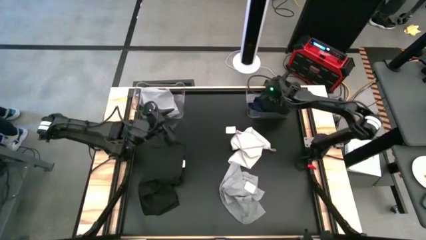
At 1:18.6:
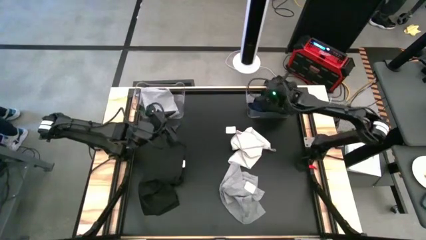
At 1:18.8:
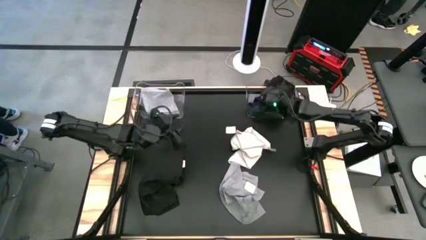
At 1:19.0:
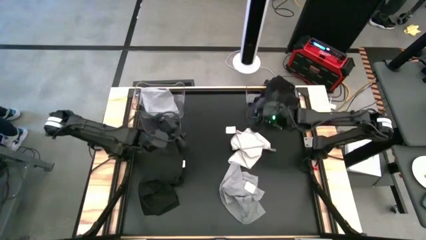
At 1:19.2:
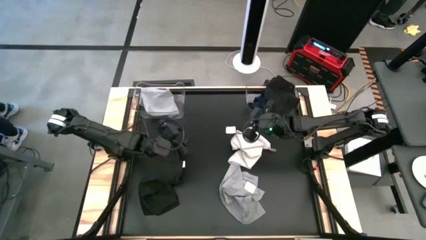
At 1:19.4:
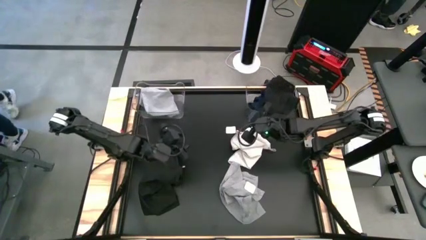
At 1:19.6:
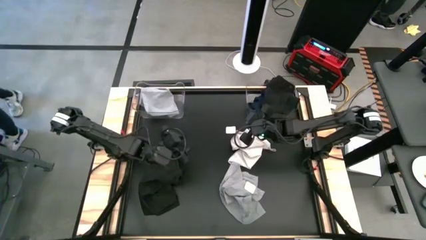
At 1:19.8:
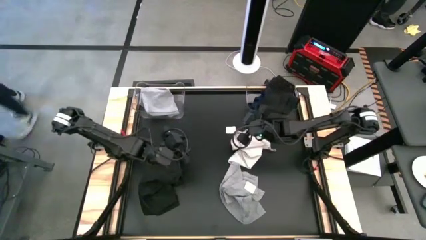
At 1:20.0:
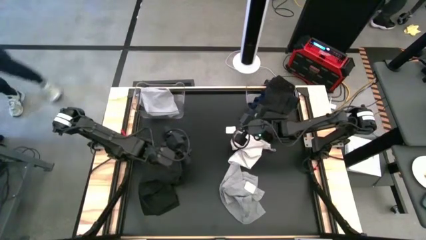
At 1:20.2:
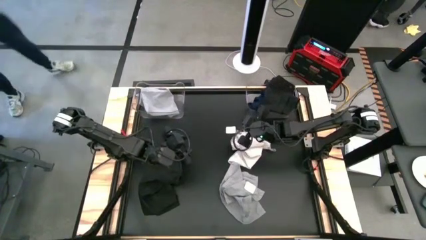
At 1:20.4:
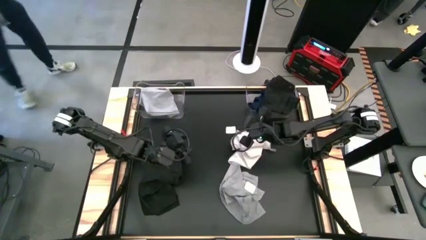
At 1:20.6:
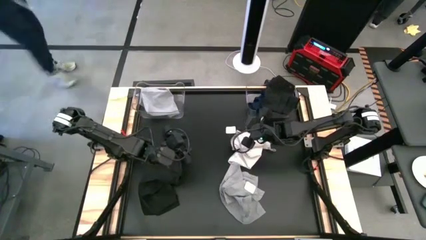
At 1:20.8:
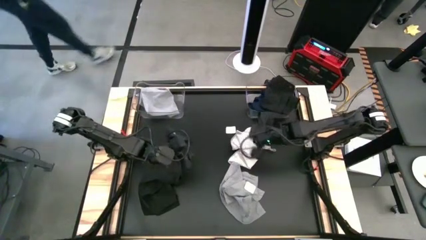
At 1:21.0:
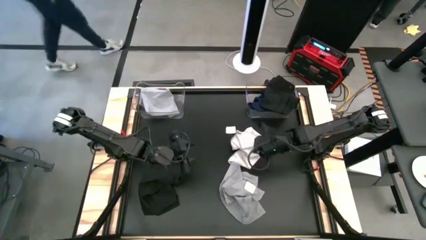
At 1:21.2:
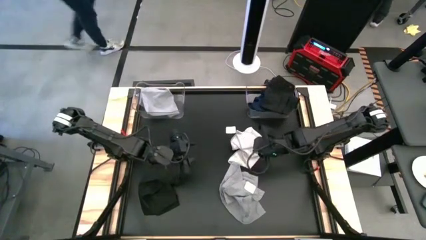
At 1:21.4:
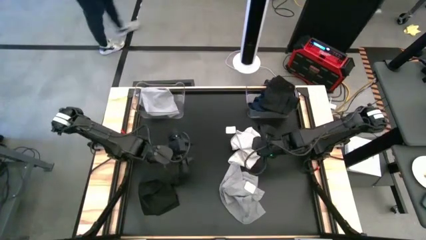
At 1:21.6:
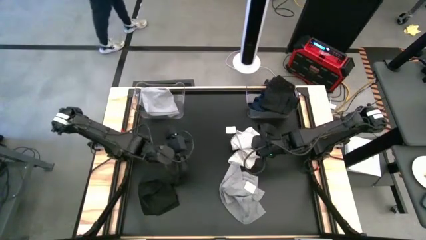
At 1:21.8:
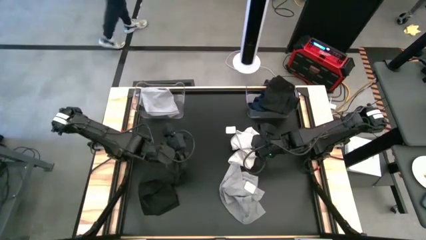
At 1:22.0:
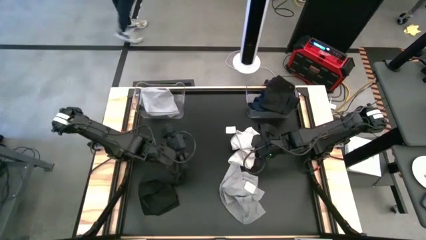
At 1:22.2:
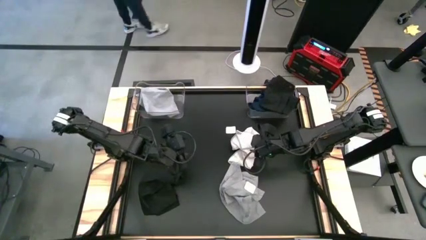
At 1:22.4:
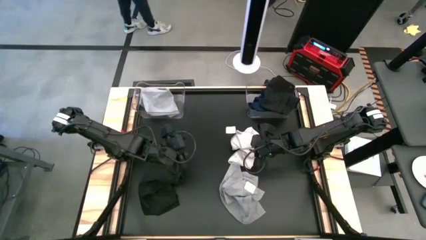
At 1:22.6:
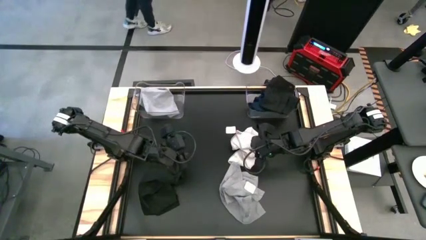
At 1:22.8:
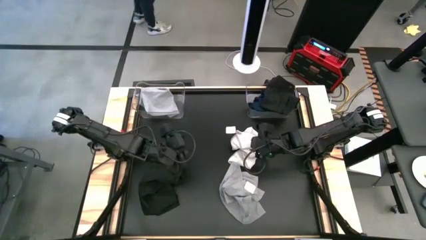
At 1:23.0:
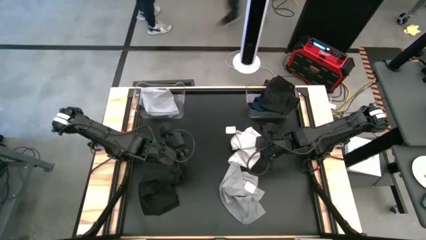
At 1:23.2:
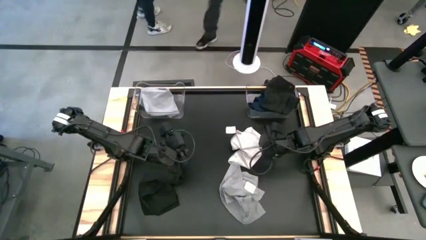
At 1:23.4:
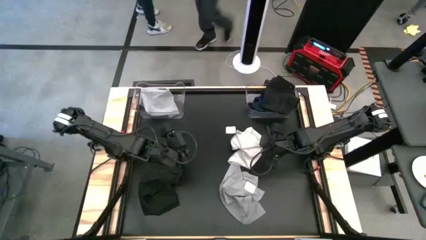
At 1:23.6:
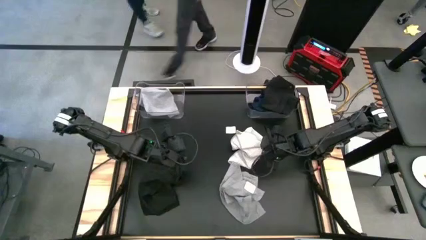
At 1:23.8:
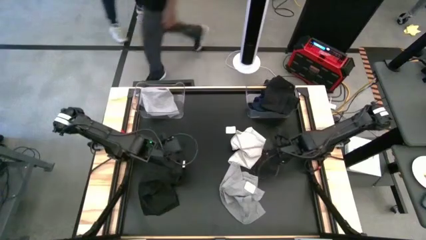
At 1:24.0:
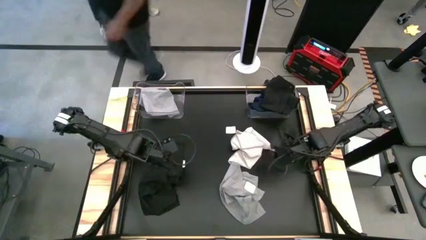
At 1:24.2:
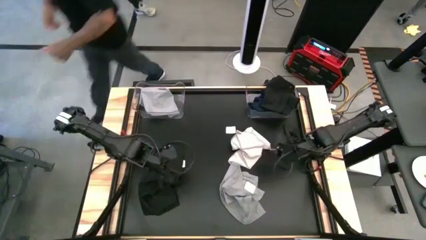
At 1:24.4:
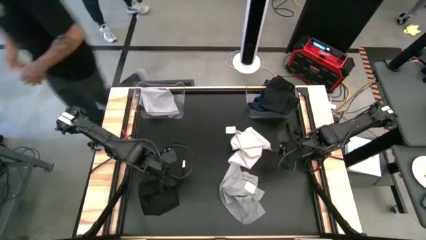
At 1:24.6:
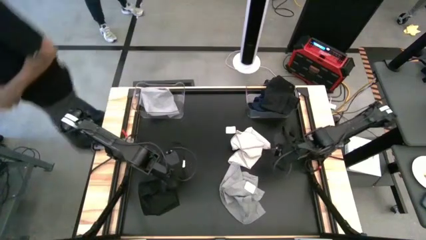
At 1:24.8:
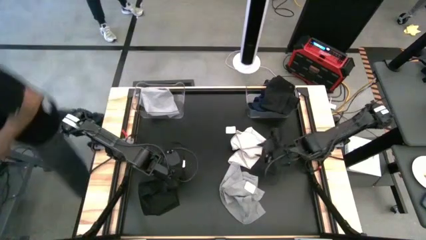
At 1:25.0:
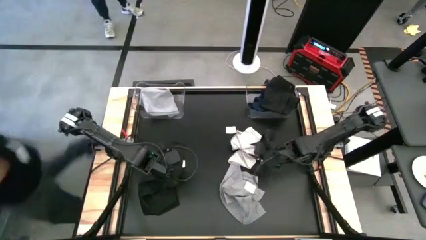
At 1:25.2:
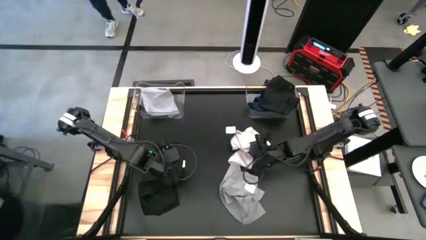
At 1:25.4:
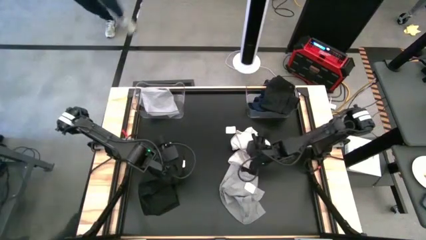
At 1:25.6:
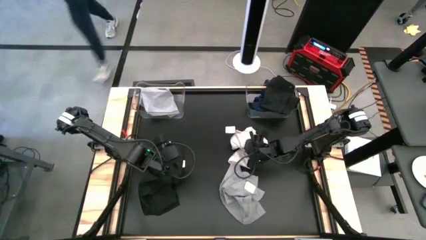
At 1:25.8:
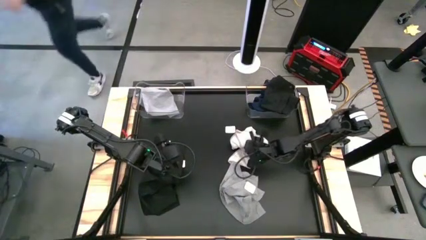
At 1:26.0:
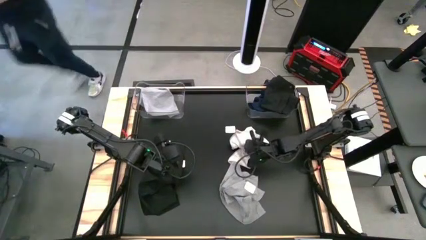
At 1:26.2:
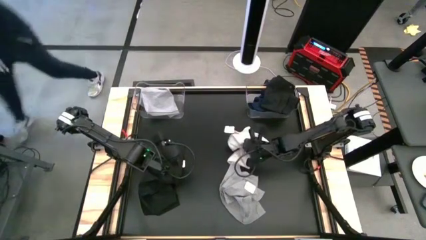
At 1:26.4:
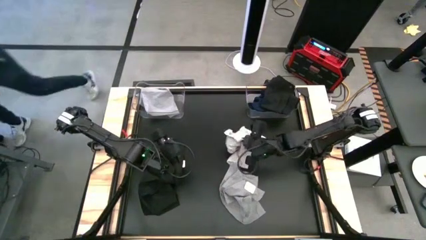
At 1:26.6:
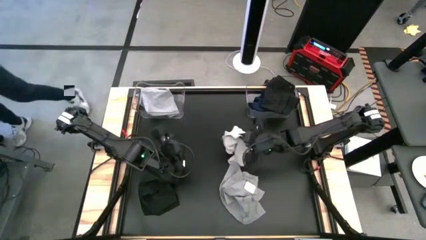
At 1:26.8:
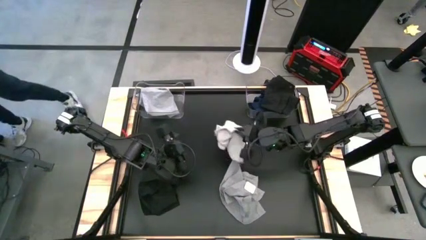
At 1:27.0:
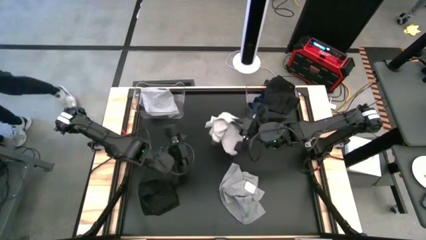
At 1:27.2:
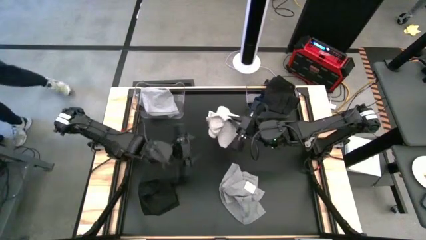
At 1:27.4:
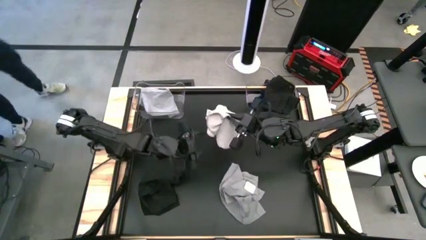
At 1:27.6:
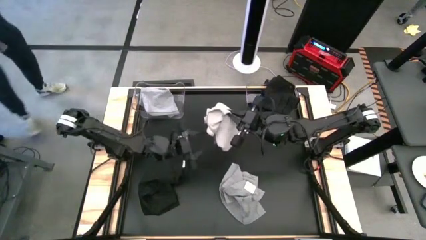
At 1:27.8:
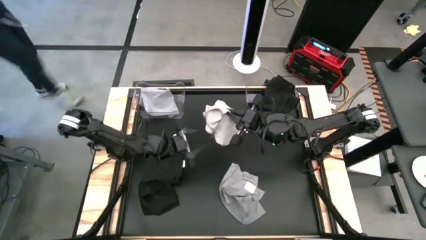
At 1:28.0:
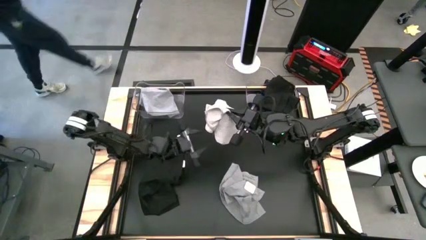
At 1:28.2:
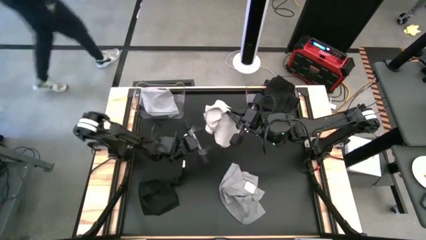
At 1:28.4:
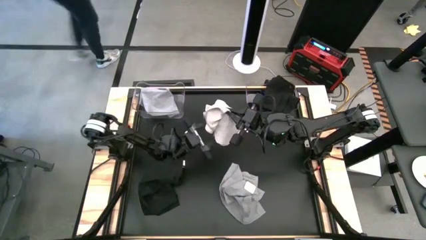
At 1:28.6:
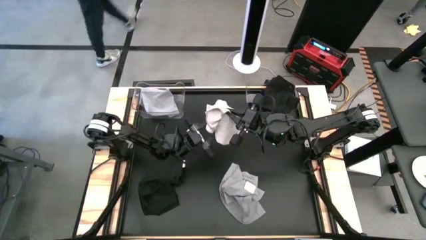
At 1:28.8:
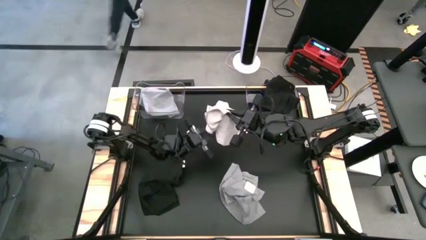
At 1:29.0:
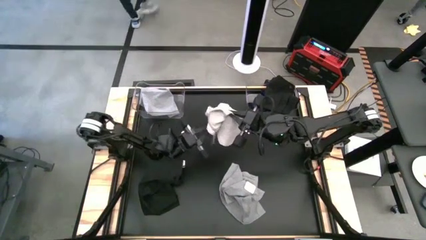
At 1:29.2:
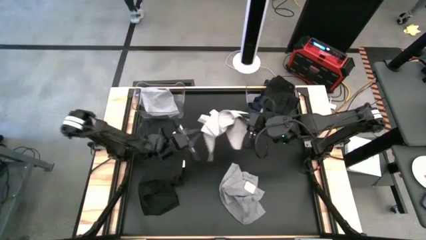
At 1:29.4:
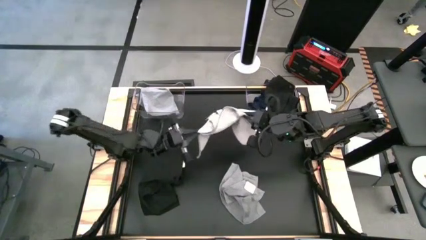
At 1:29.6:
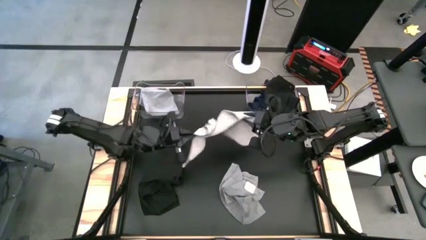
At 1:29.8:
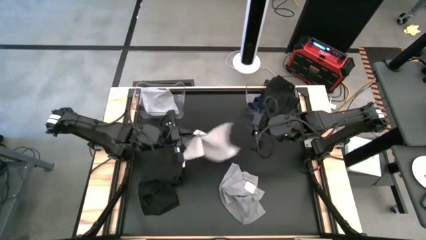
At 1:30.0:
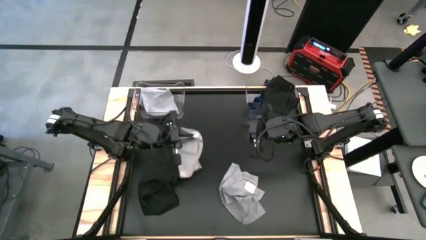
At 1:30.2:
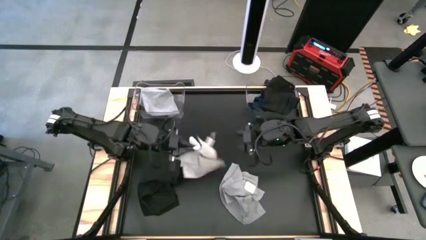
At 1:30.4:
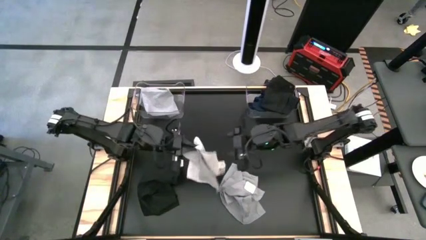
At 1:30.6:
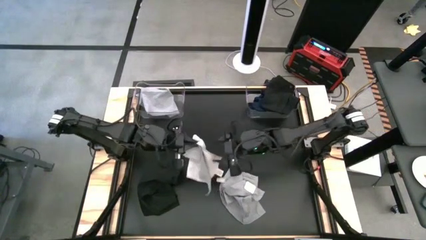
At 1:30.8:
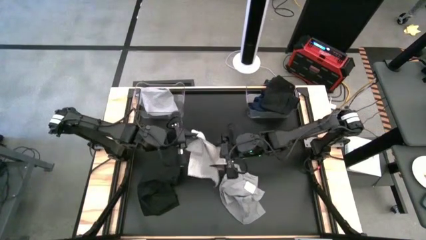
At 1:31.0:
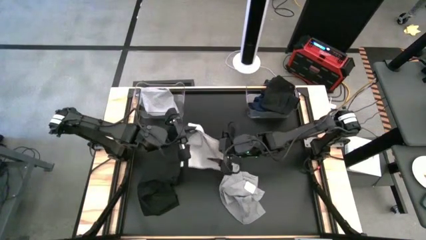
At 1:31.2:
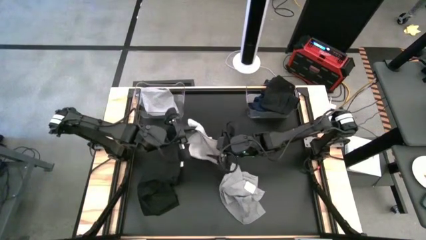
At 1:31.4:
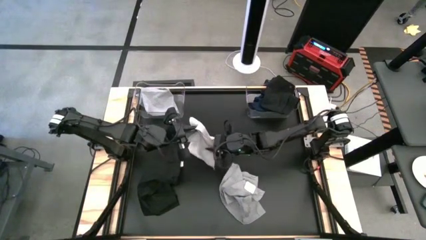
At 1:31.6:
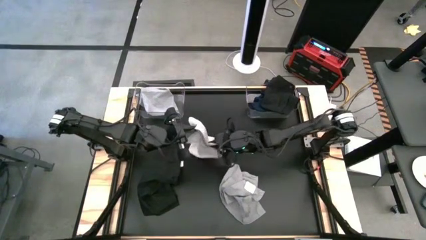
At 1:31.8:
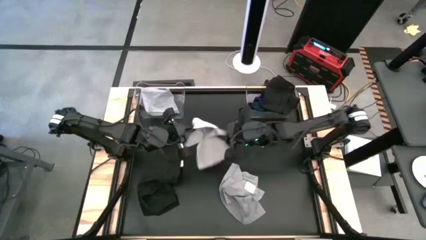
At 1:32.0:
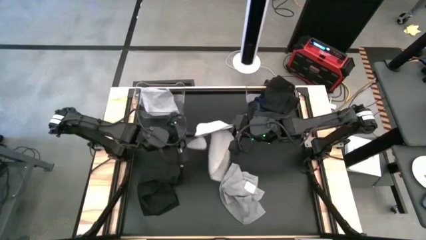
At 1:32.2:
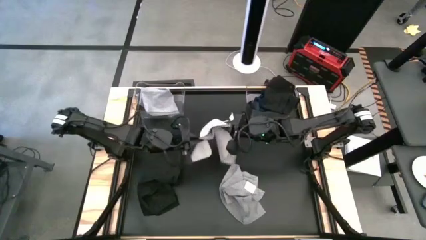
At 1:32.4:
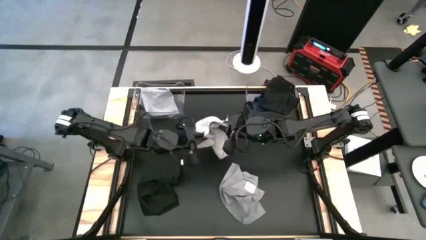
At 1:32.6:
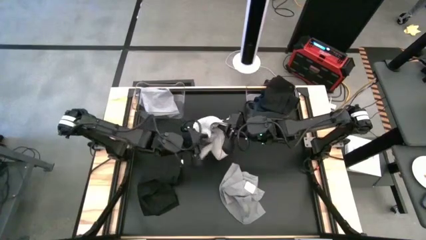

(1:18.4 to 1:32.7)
Task: Sort towels by color in basket
Put the light gray towel into the left transparent bin
